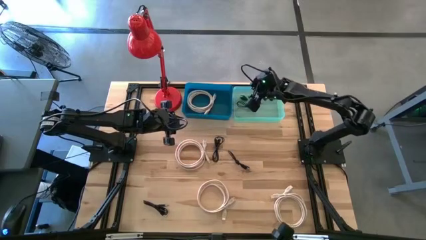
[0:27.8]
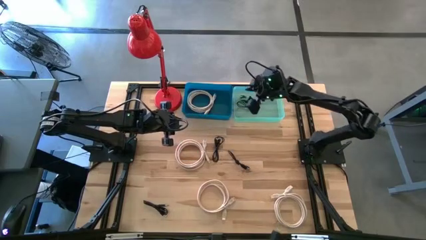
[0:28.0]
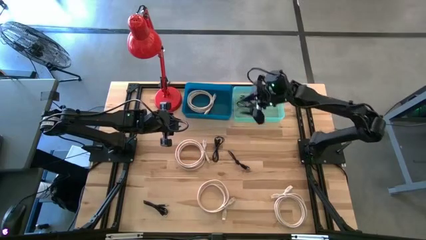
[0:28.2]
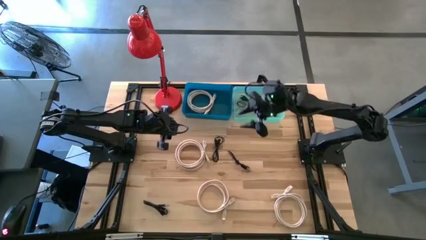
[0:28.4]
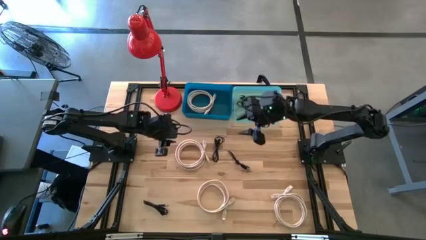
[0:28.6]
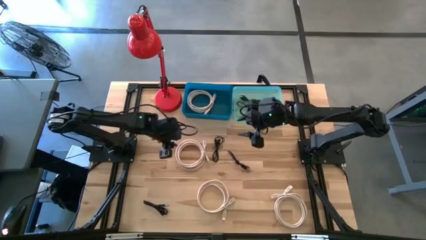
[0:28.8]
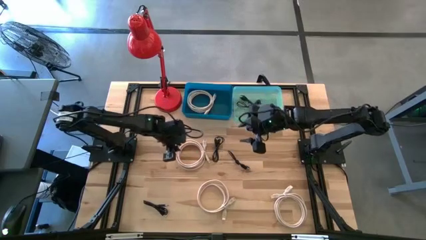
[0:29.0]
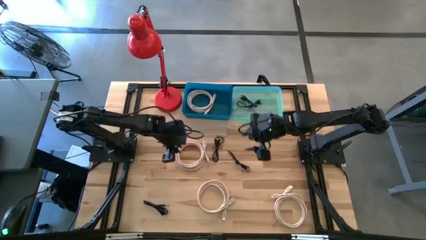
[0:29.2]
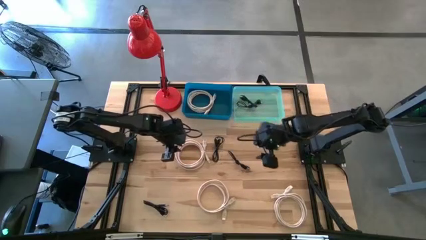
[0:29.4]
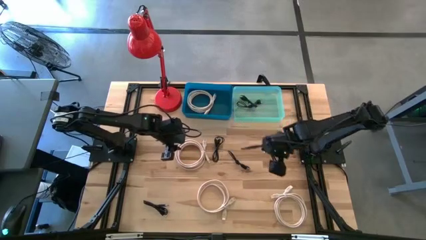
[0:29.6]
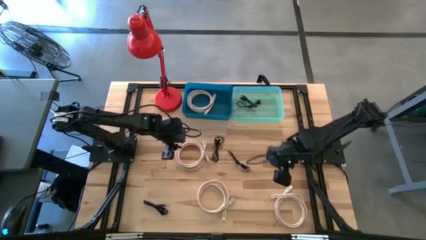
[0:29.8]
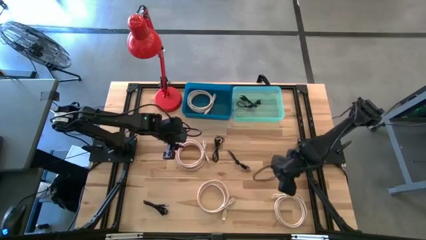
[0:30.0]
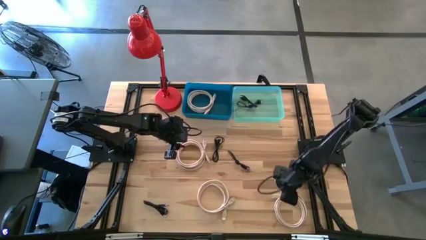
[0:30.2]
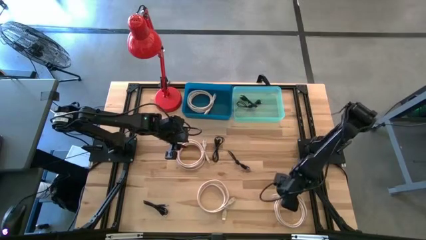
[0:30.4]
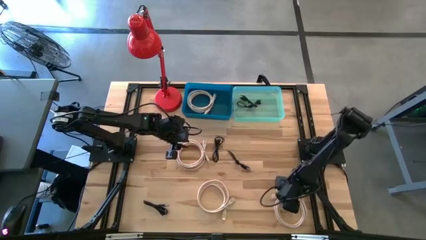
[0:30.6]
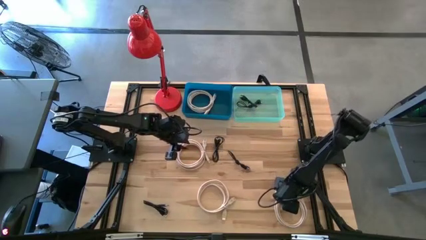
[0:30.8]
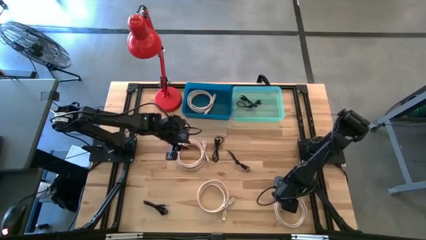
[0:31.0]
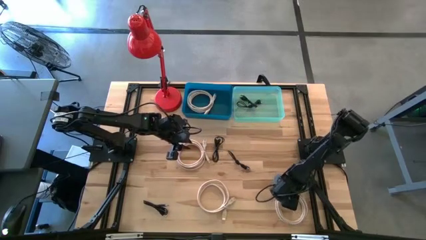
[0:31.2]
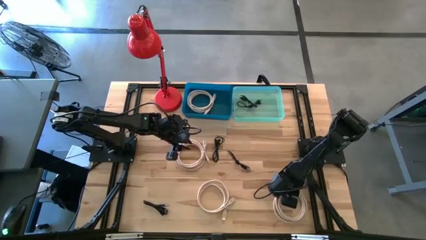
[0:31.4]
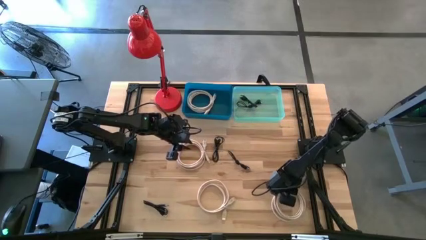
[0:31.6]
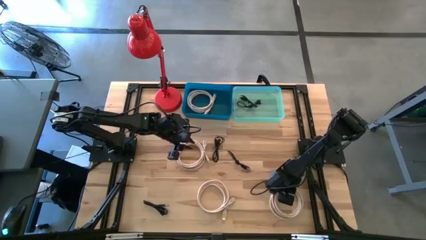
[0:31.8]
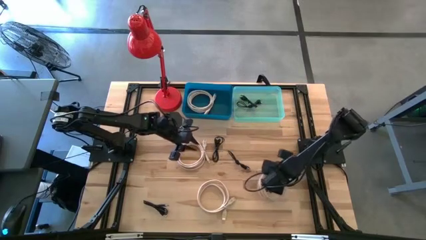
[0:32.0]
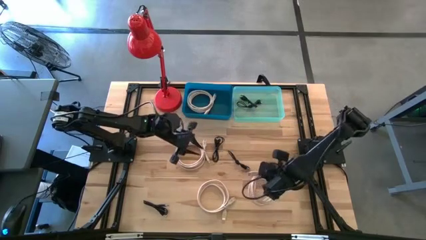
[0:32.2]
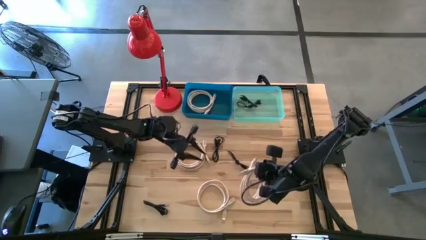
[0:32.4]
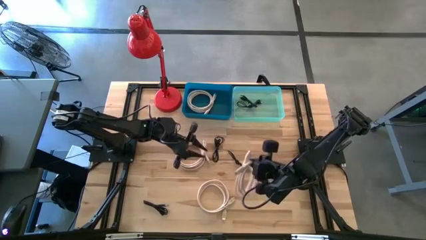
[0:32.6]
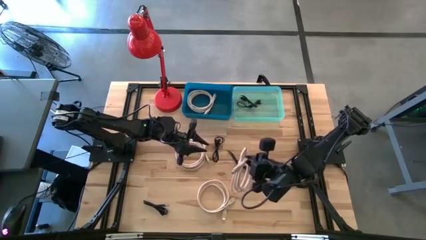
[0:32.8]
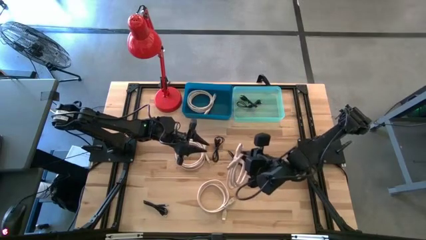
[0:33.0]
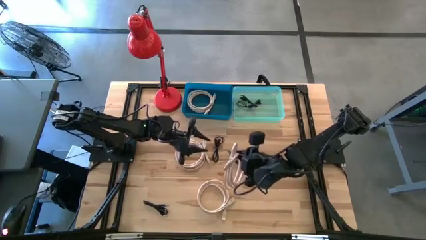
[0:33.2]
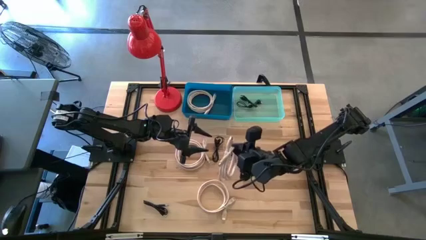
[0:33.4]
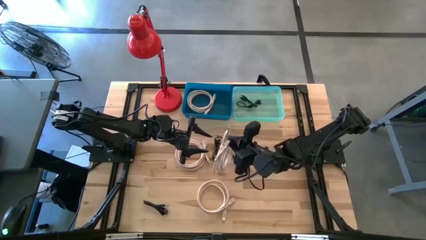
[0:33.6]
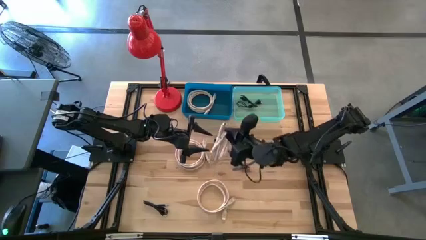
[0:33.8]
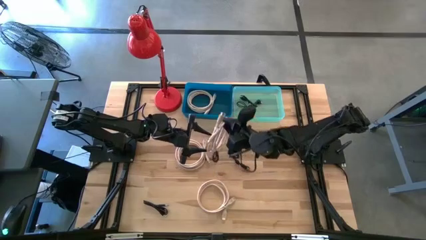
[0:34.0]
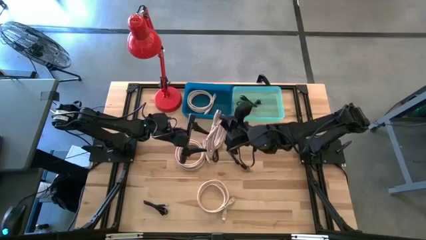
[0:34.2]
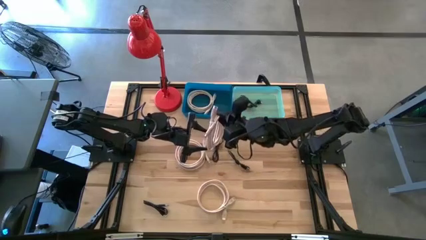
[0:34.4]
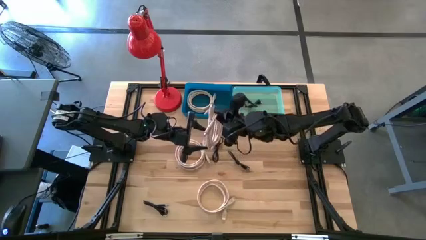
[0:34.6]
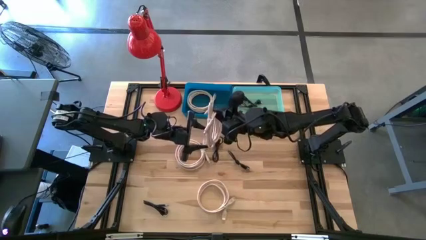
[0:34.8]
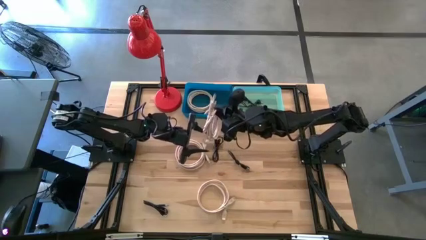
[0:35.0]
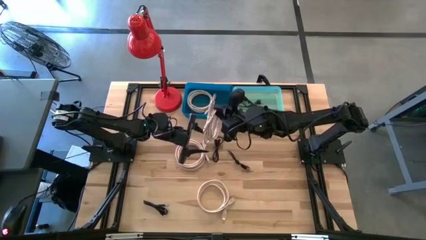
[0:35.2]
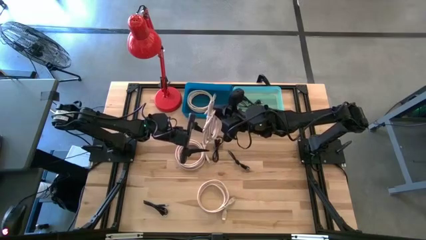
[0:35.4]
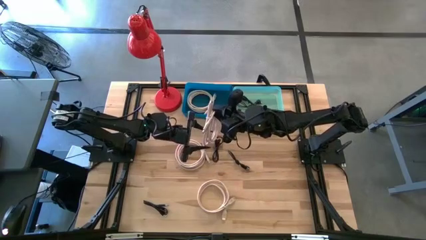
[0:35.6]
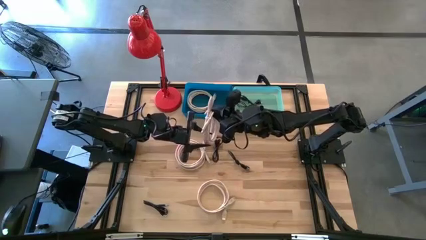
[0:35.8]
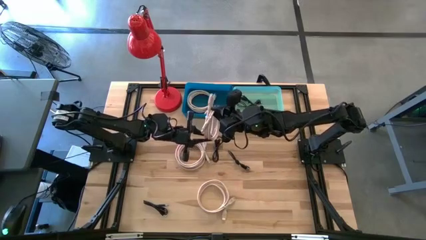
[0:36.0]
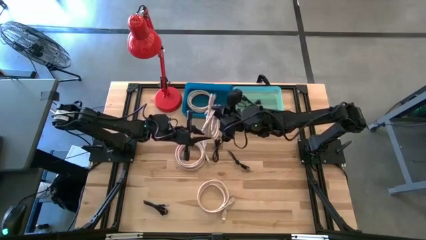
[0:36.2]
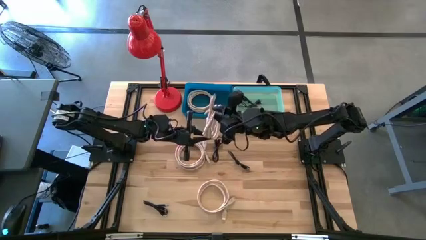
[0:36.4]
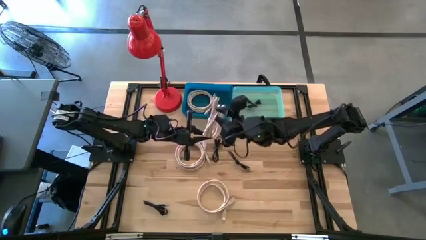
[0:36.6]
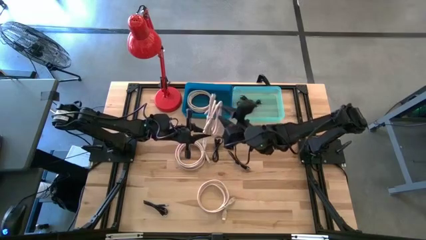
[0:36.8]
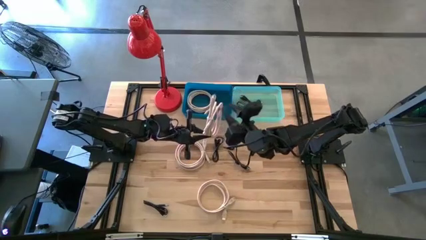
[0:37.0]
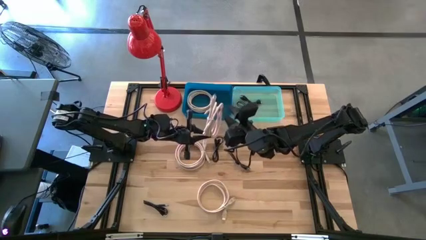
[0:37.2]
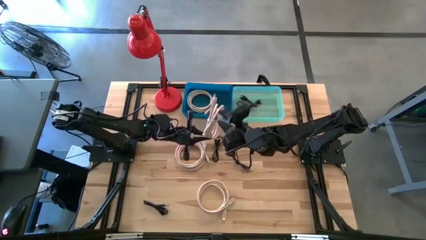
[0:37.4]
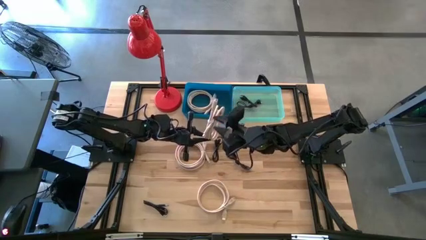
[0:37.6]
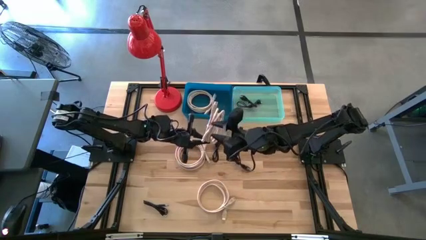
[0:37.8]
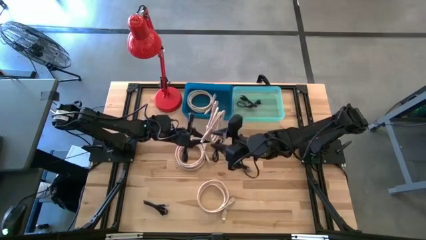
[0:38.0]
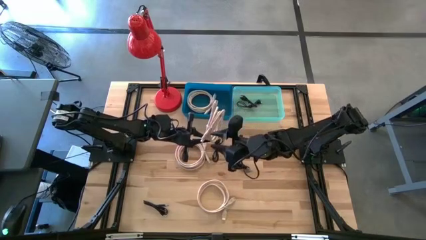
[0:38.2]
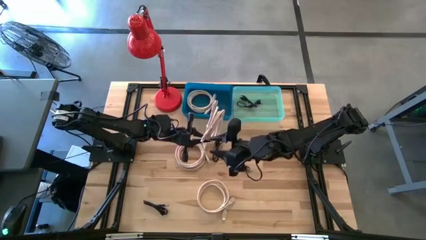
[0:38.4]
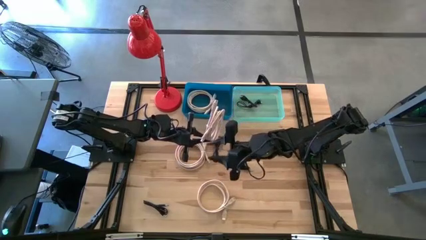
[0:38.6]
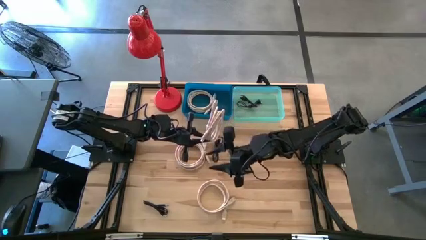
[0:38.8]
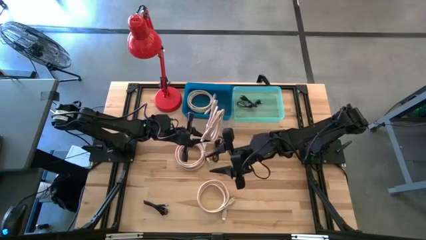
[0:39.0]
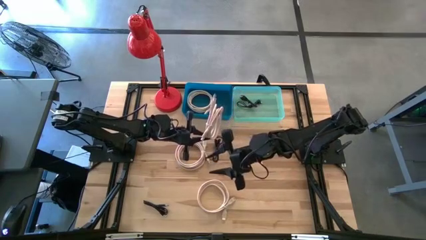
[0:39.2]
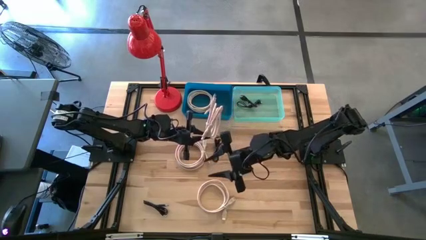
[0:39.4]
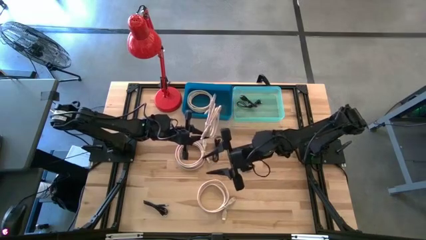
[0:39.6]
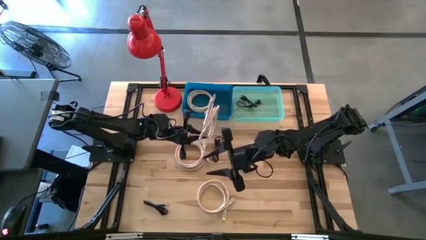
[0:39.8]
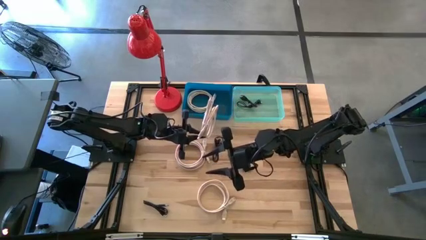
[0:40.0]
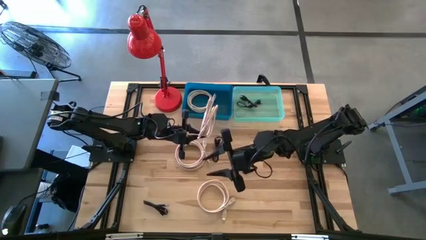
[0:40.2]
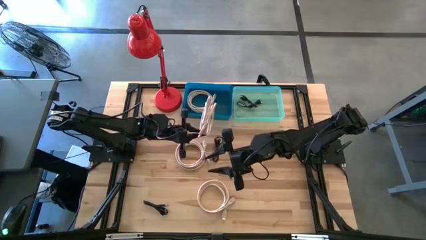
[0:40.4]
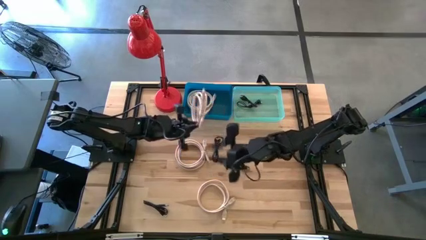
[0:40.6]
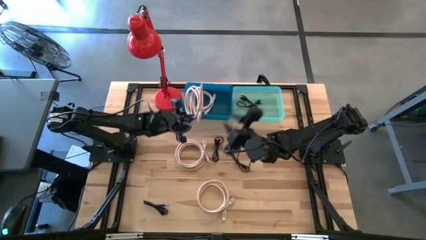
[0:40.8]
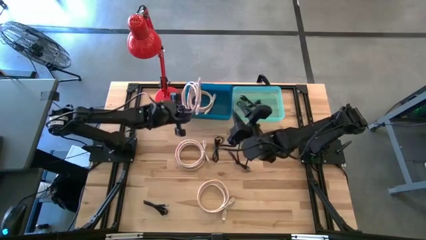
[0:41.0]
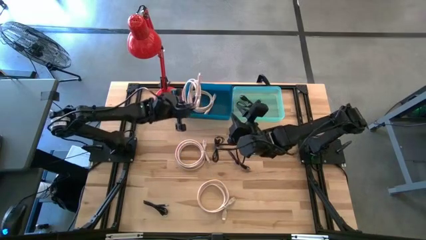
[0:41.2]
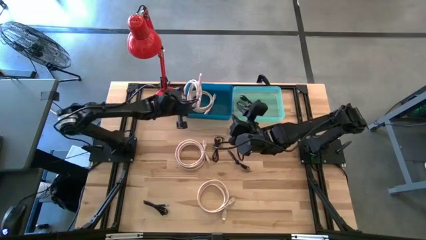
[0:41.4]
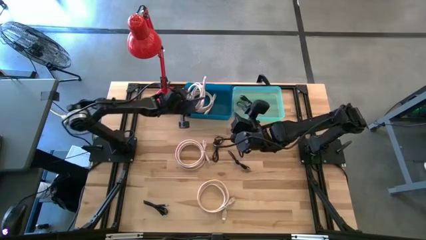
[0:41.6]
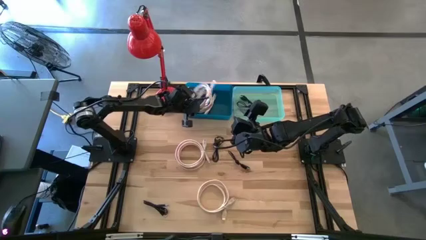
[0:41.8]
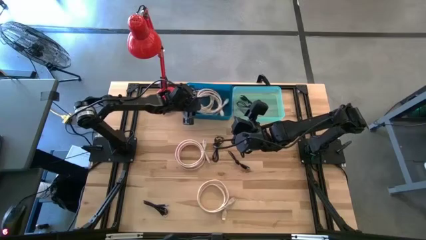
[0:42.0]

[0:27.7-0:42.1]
Task: Pick & Place USB Port
Put the brown charger cable into the blue bin
